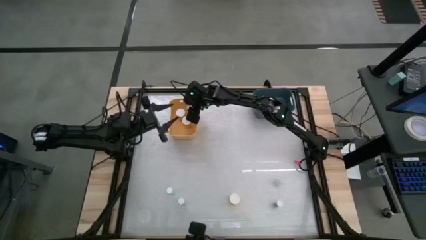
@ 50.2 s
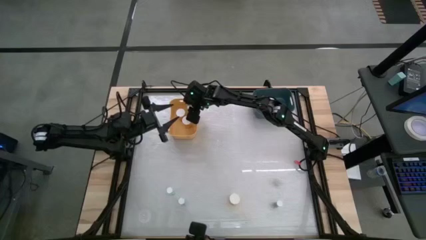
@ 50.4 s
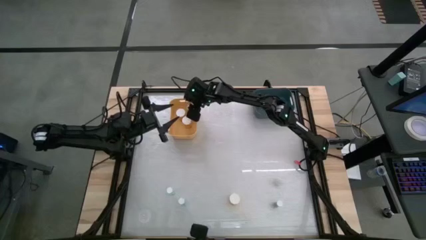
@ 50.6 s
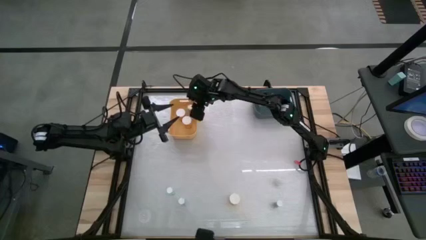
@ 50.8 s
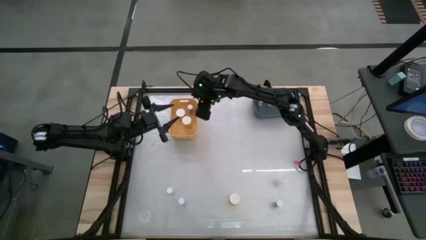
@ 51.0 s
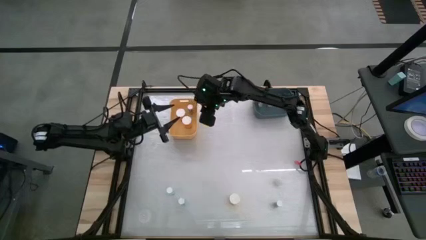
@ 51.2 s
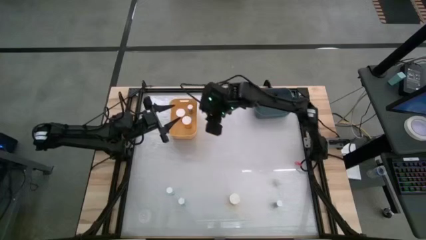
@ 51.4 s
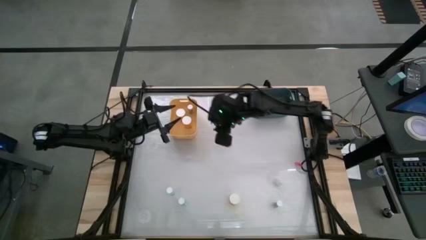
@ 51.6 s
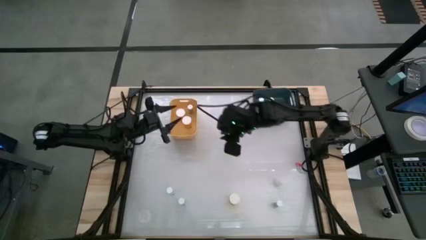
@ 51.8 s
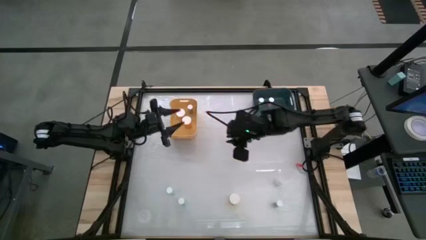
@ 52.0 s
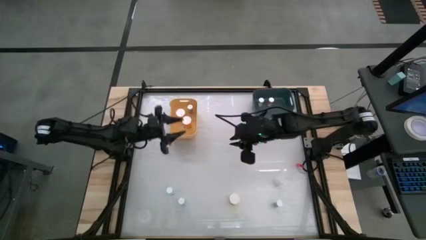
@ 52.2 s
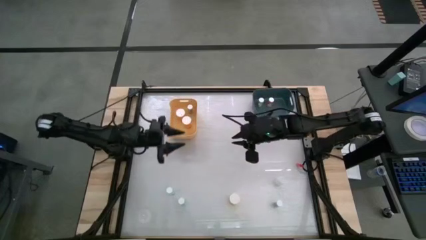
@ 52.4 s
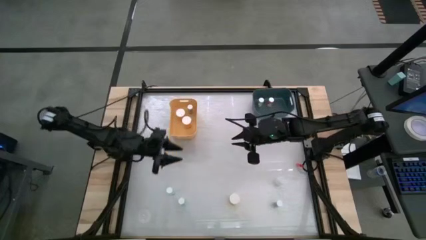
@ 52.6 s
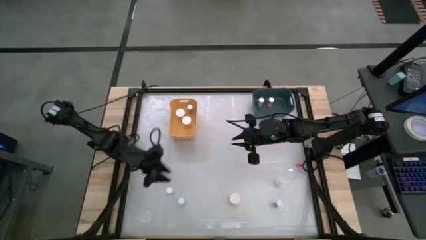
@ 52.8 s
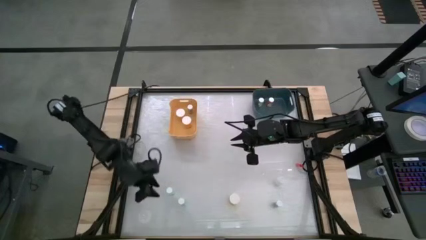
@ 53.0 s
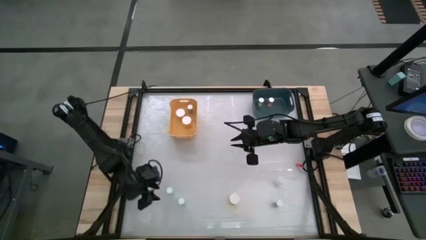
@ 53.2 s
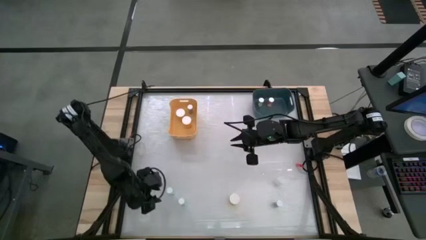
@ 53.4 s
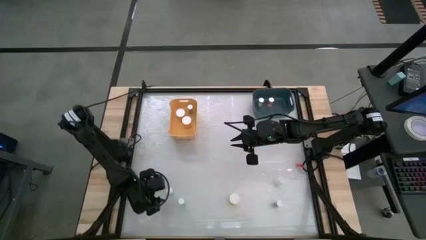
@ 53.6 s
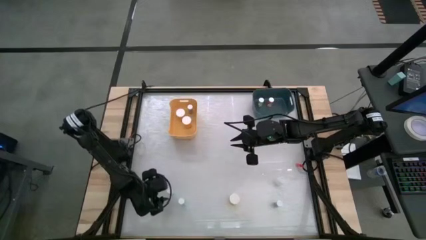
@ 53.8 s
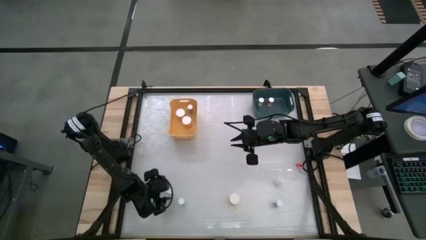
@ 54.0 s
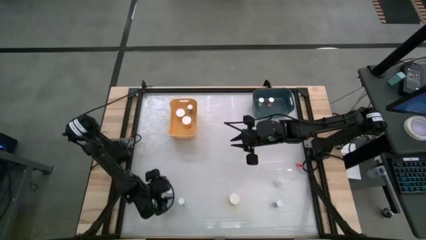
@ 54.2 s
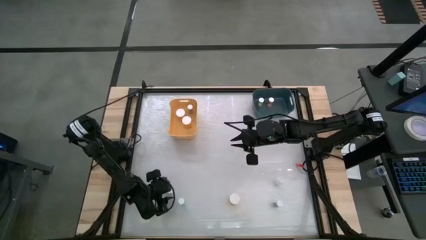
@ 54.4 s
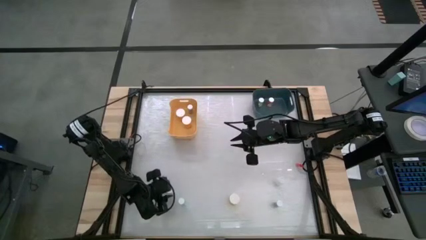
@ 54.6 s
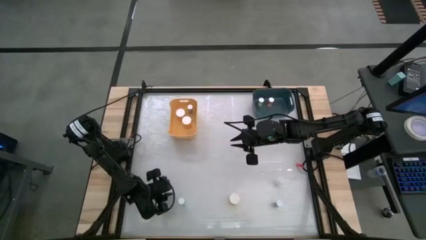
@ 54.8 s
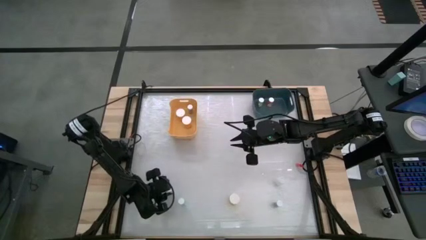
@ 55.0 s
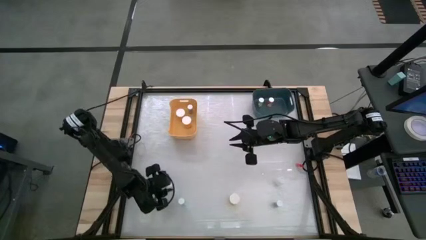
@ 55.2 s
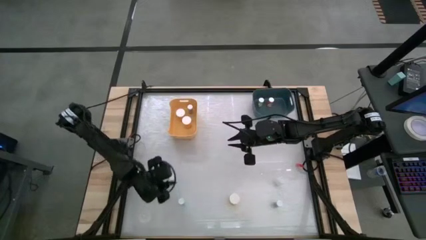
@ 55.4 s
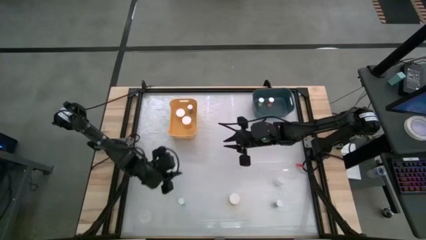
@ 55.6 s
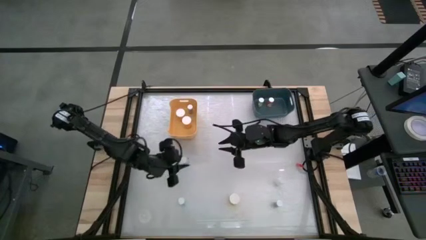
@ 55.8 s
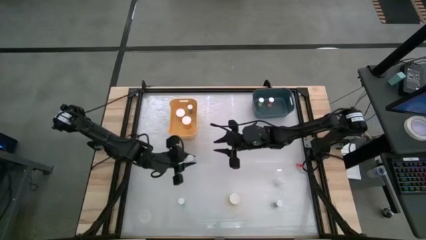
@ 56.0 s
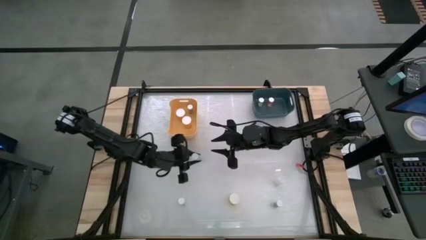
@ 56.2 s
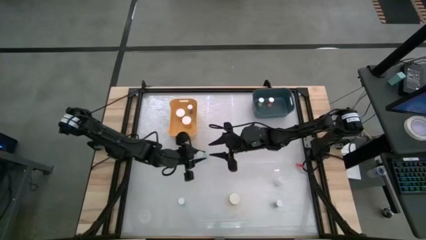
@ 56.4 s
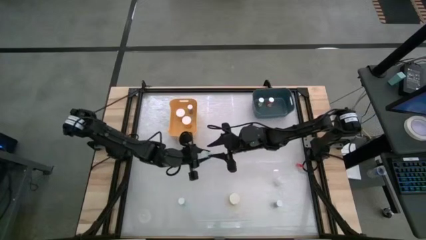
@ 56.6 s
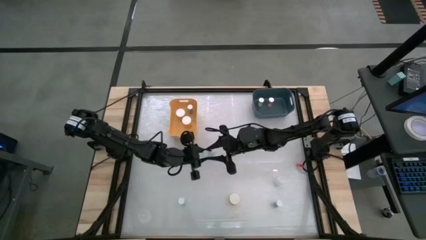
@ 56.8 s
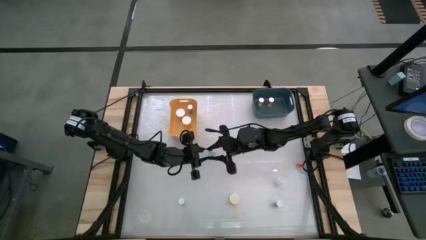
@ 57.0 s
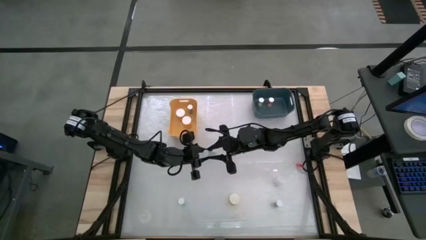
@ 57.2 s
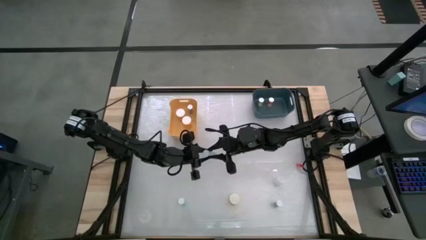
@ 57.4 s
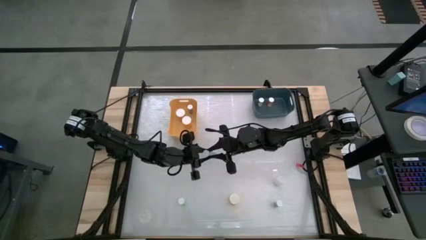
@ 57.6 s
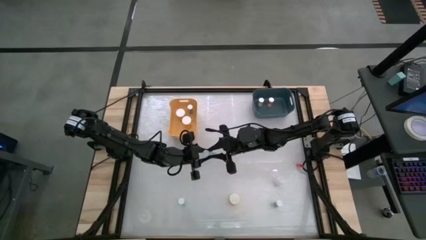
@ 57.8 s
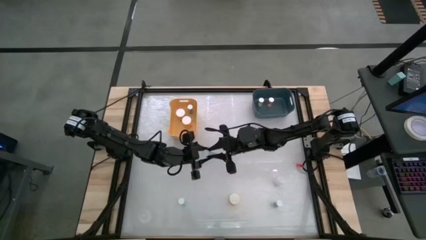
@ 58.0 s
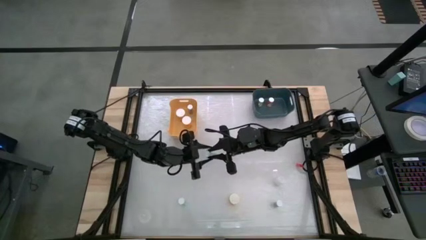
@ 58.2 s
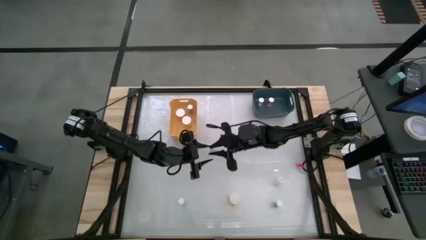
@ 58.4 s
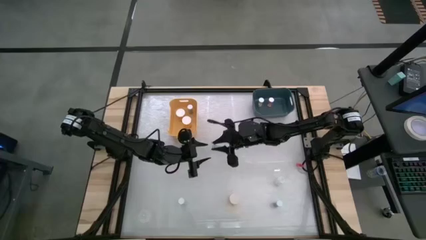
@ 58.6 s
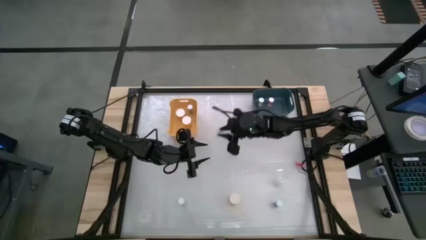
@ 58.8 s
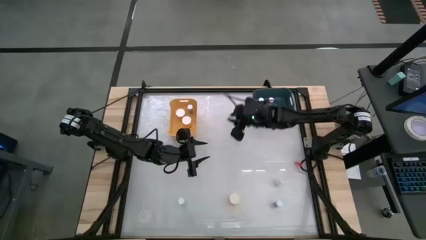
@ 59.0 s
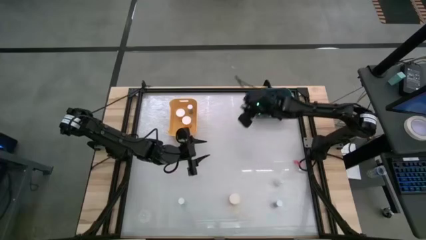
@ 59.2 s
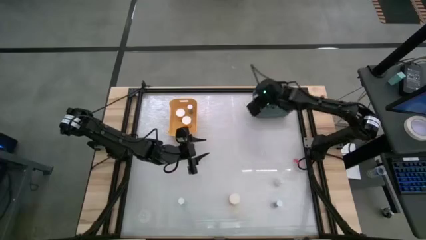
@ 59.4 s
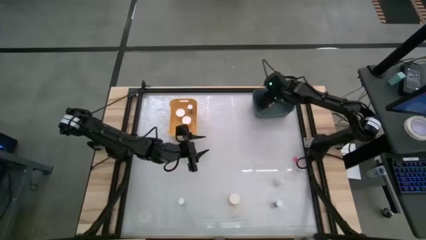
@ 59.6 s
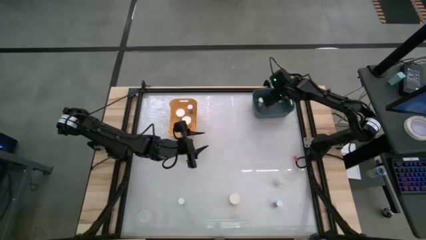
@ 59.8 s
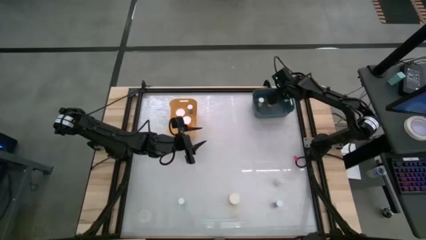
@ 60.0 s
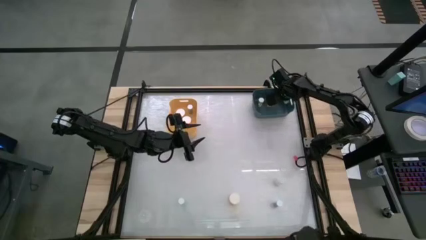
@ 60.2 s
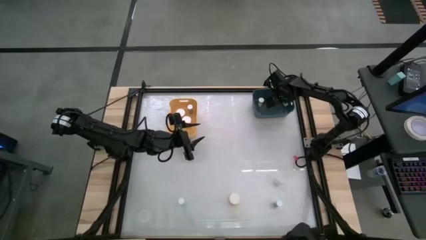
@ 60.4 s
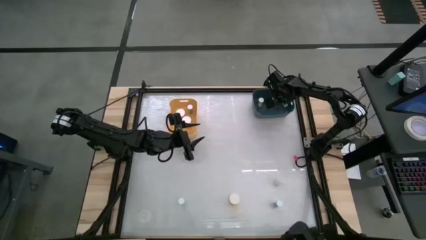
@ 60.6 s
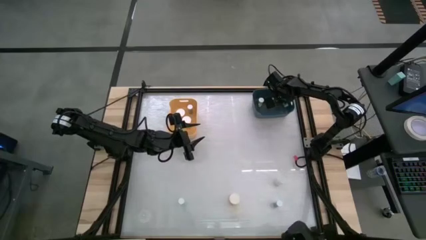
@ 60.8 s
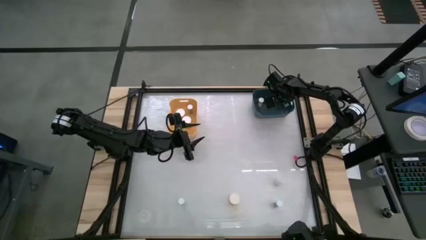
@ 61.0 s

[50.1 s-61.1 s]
Task: Pick and place medicine bottles into bin by pill shape (circle, oval)
Put the blue bottle pill into the yellow bin
